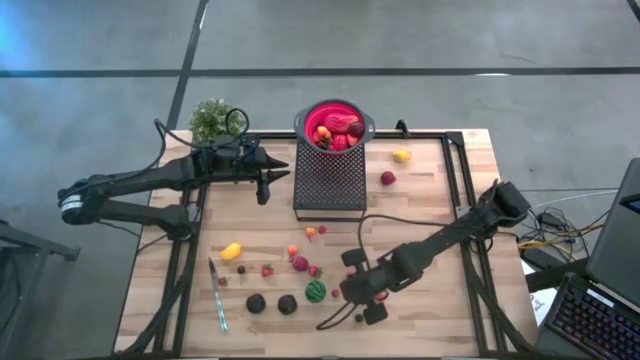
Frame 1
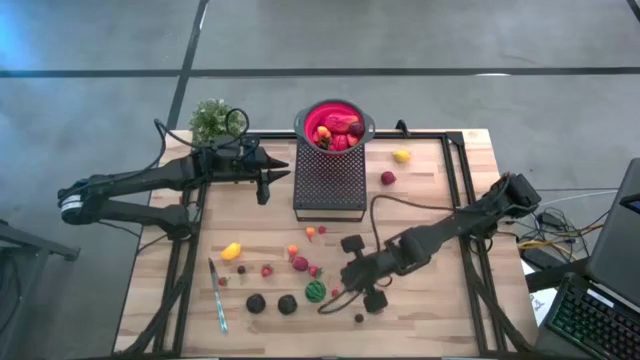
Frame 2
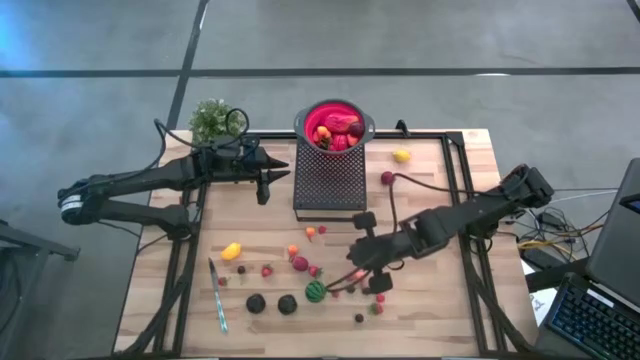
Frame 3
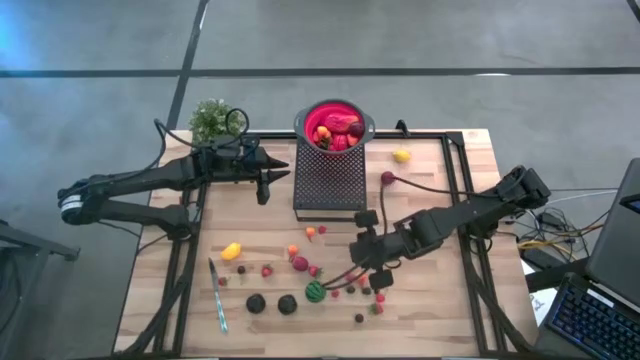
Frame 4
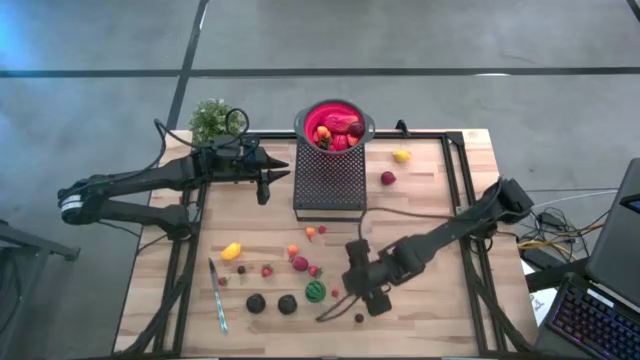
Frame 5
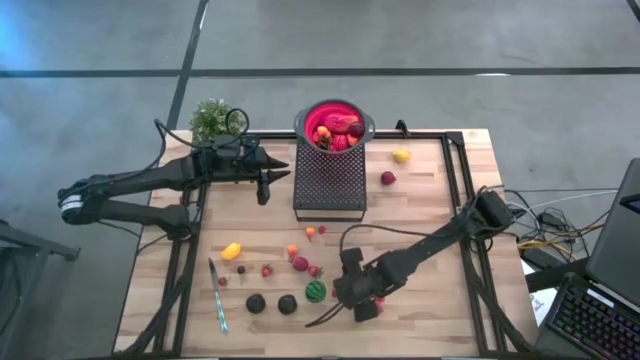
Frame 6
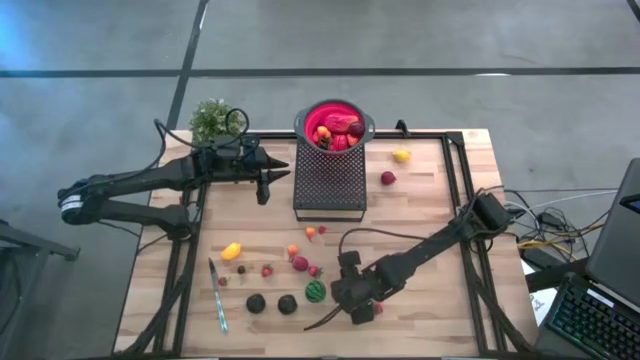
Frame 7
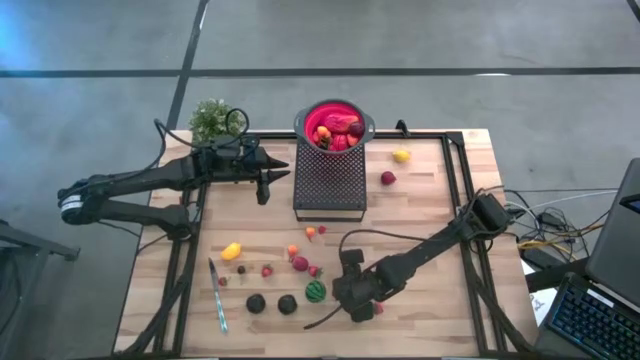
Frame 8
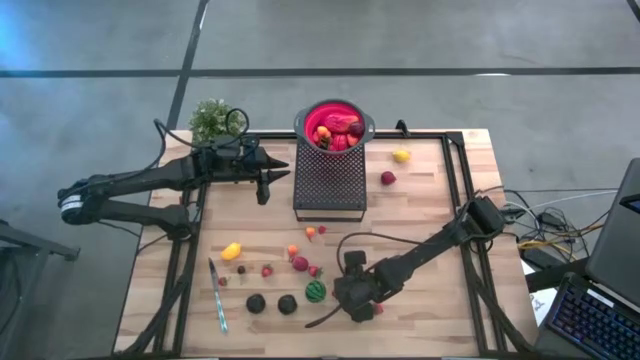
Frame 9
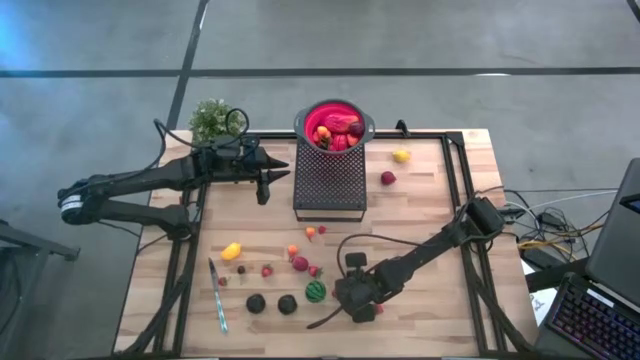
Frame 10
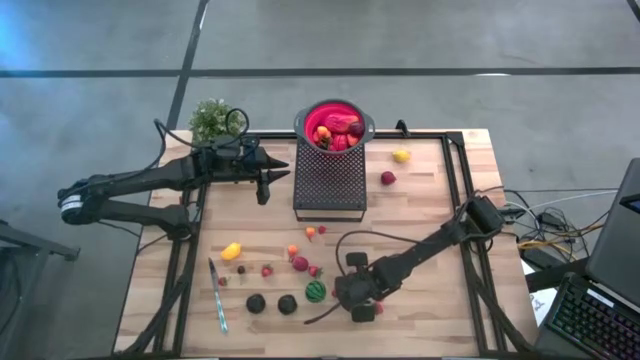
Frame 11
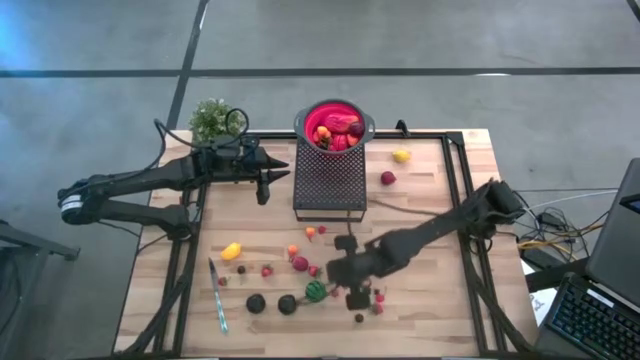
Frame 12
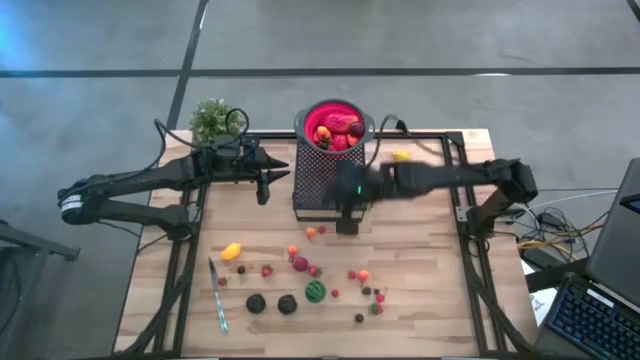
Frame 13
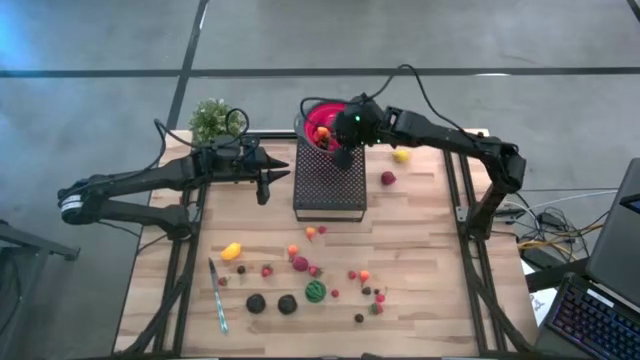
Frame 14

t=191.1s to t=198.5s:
Task: Pick & Place Fruit
Put the black cherry into the red strainer bowl on the shelf

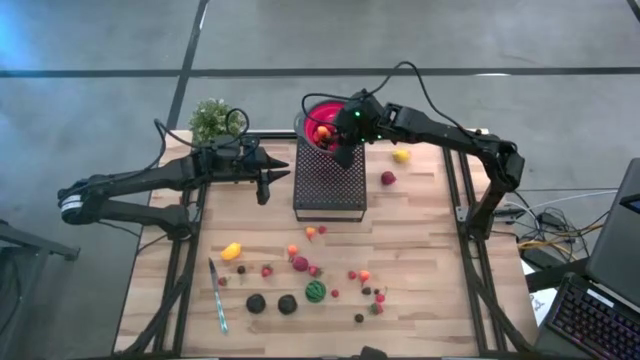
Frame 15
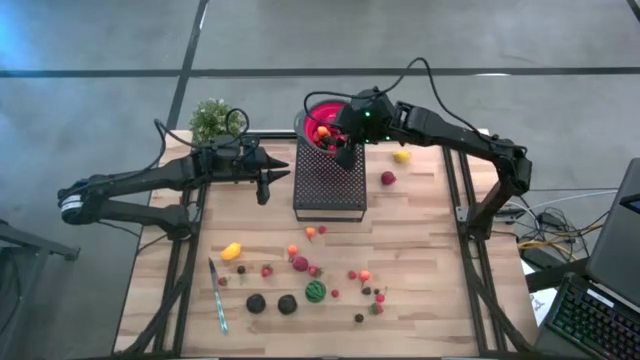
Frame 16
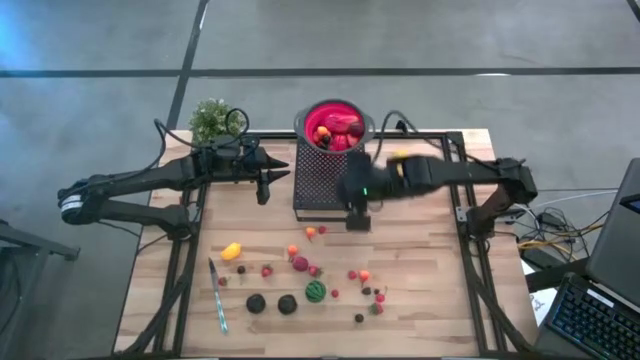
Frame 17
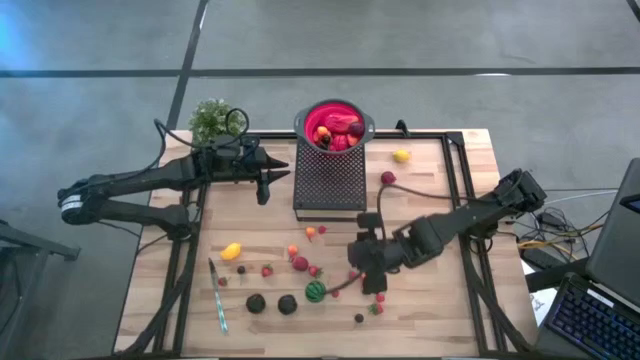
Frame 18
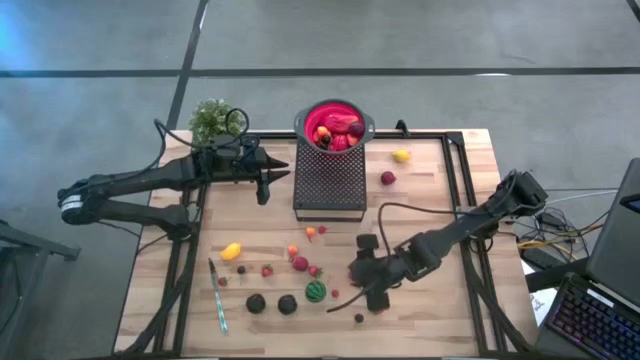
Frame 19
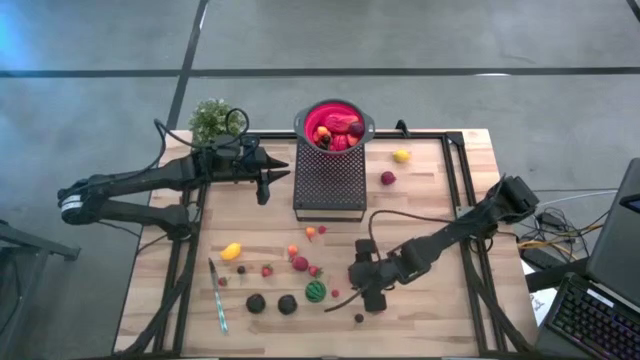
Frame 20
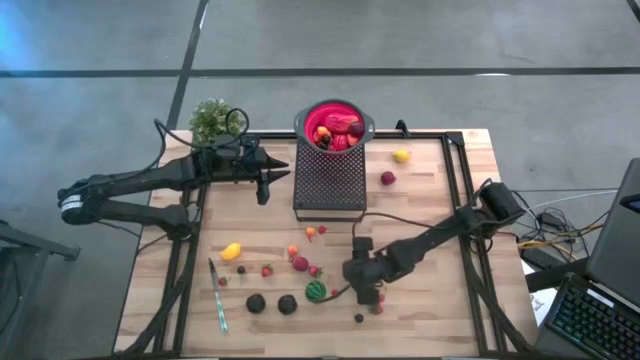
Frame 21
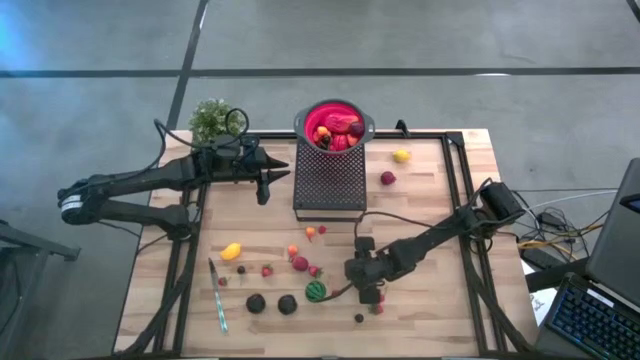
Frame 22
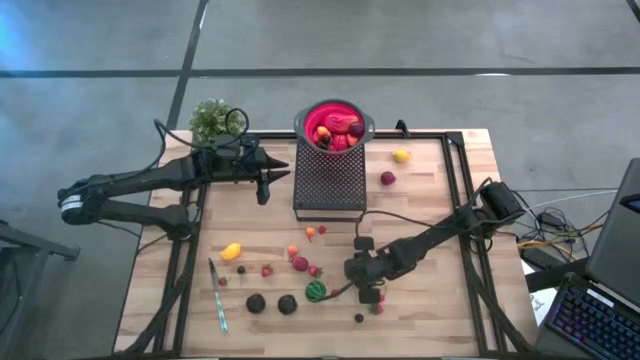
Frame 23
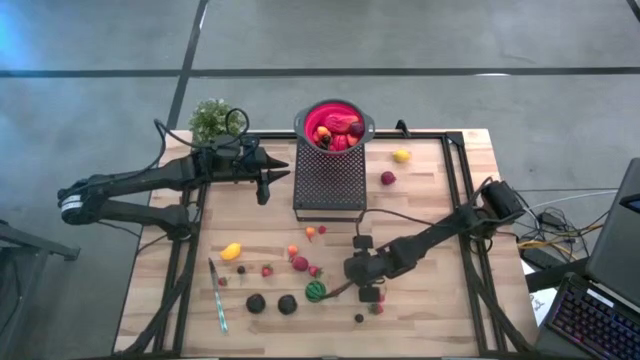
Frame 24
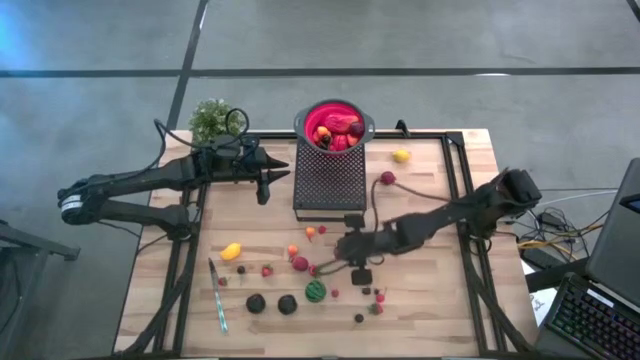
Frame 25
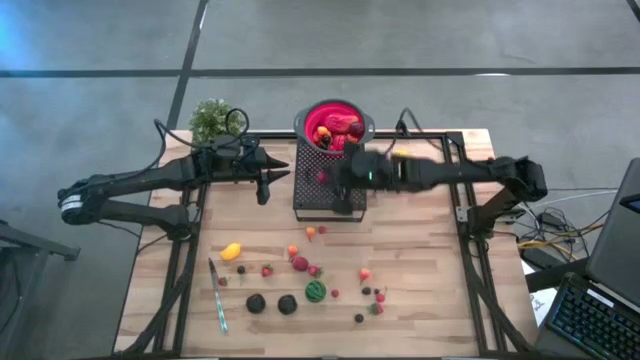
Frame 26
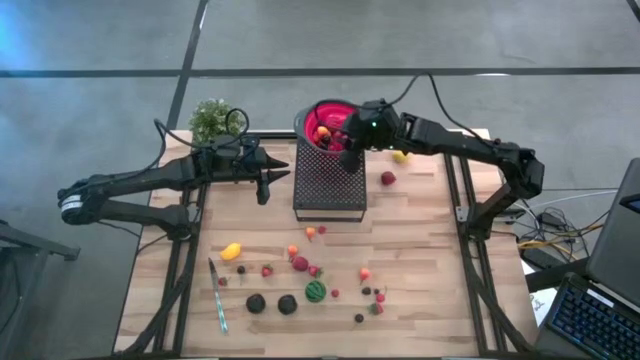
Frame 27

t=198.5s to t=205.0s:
Put the raspberry into the red strainer bowl on the shelf

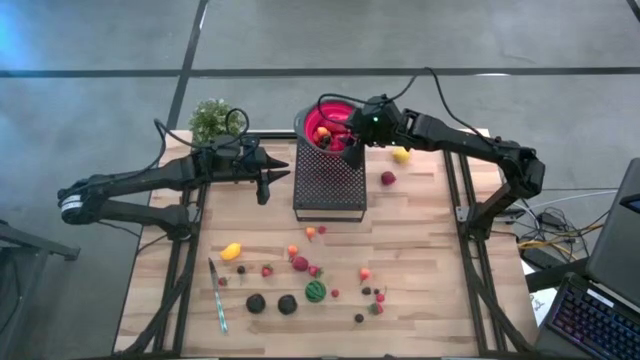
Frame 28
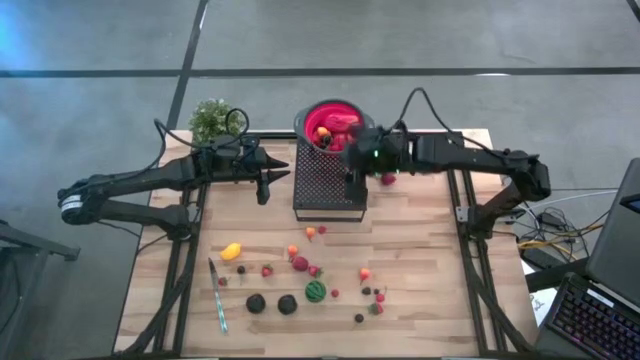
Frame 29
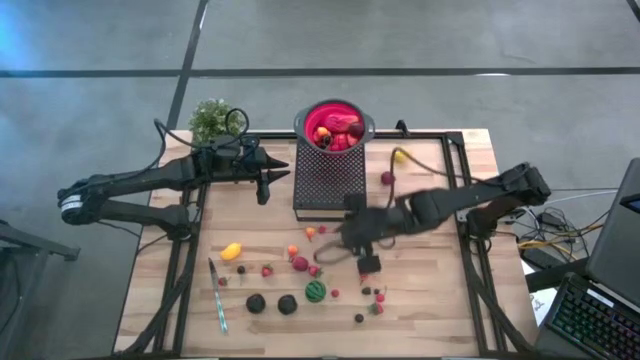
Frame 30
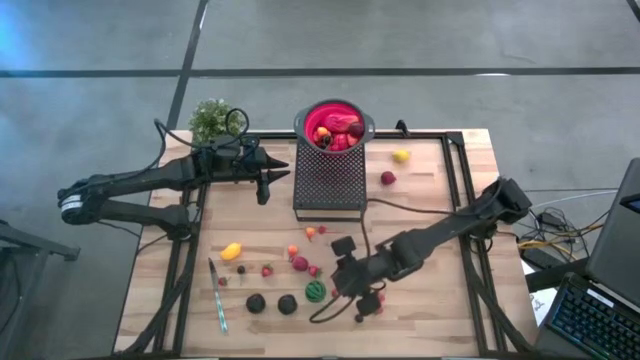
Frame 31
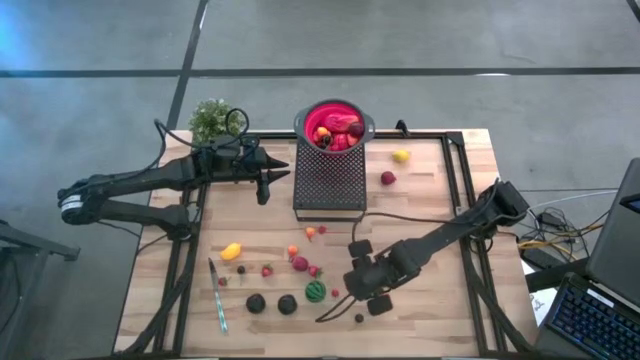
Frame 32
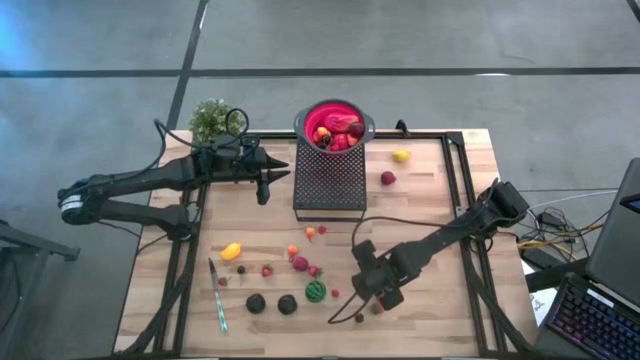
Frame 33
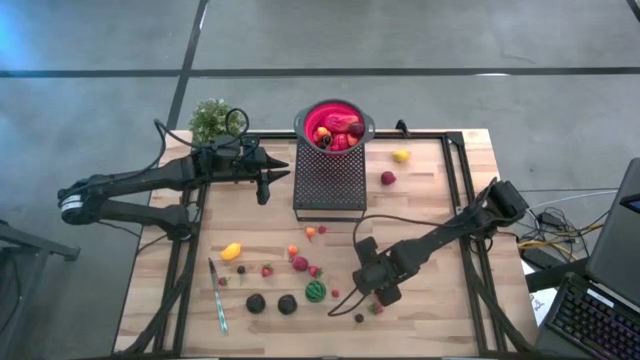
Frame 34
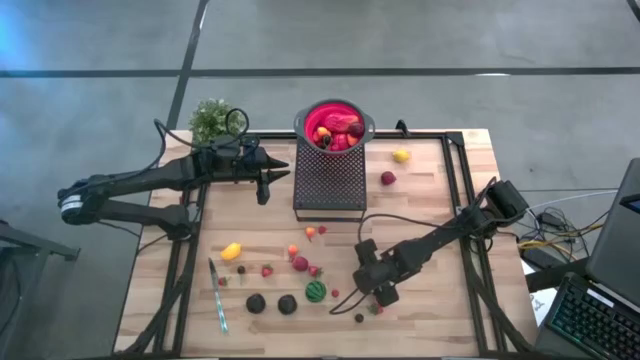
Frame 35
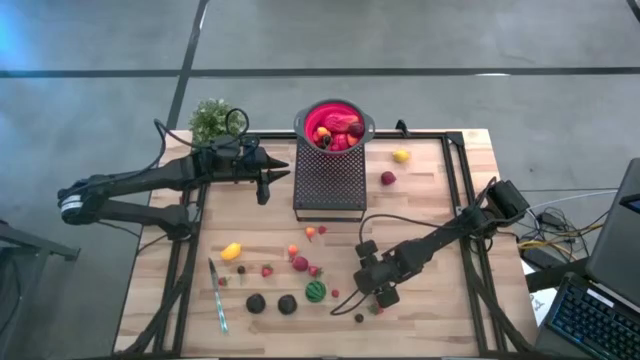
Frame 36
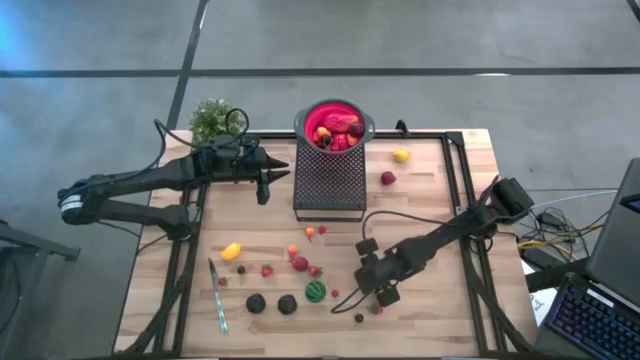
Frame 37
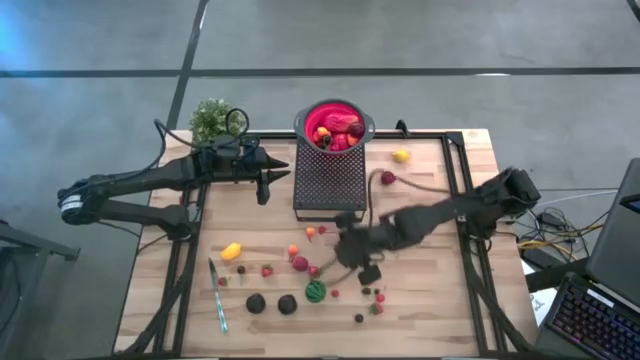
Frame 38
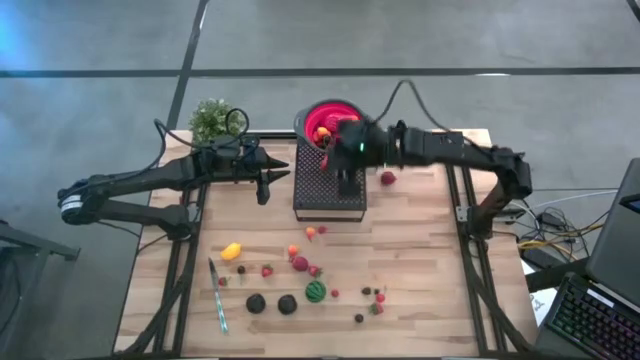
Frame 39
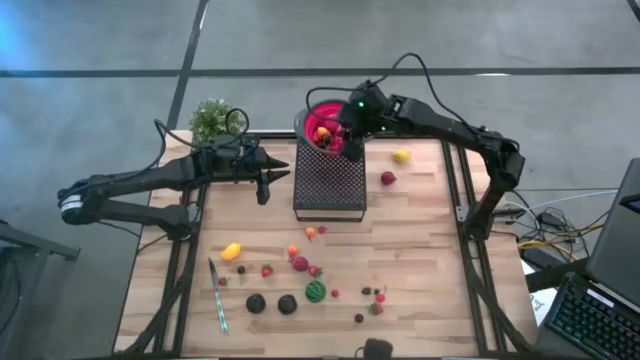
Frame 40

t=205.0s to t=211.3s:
Put the pear into the red strainer bowl on the shelf

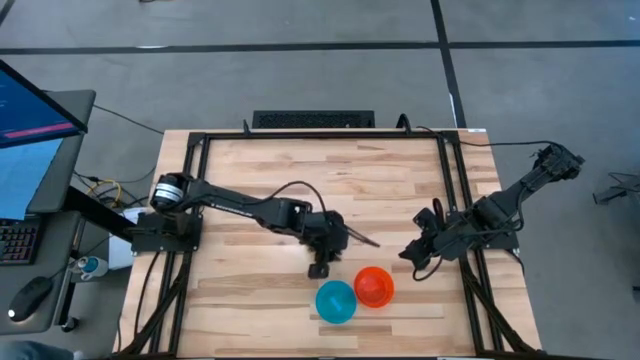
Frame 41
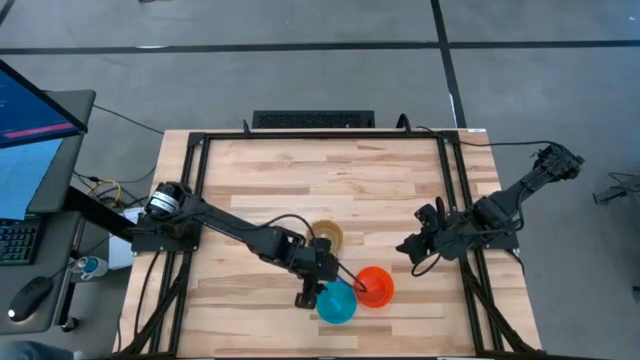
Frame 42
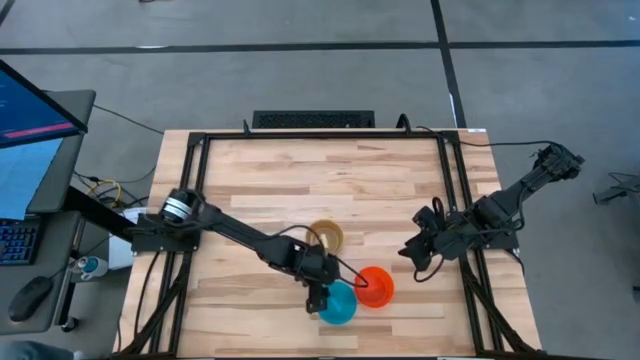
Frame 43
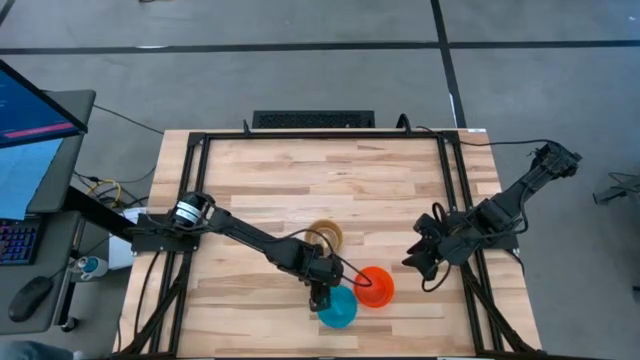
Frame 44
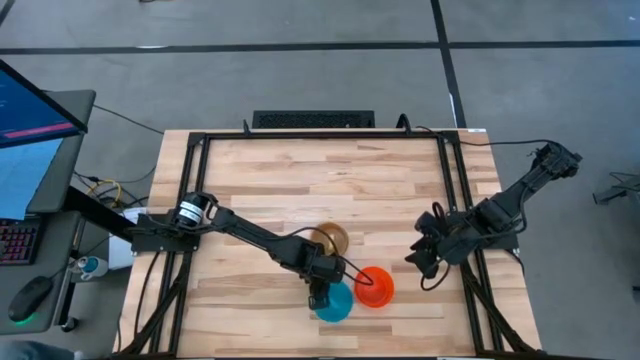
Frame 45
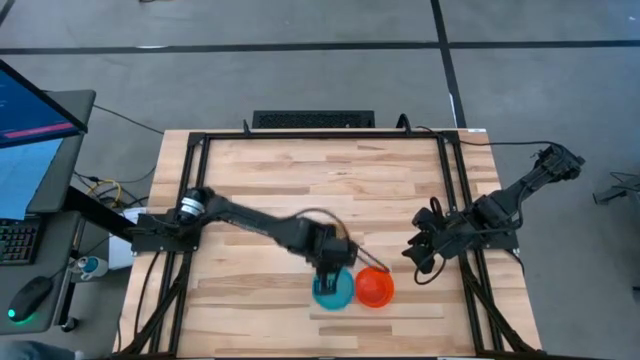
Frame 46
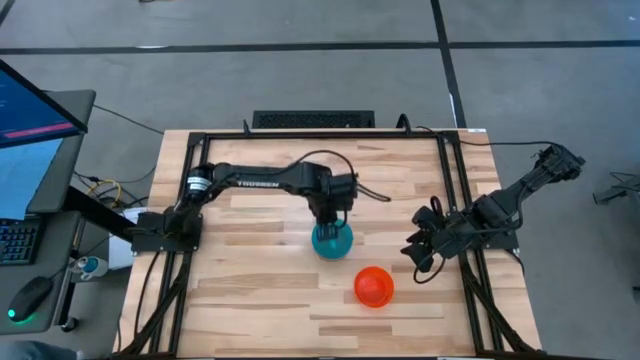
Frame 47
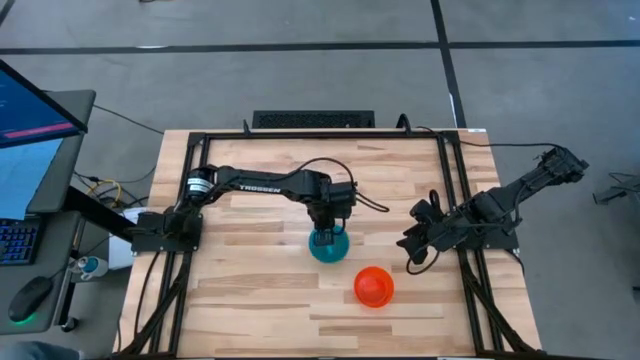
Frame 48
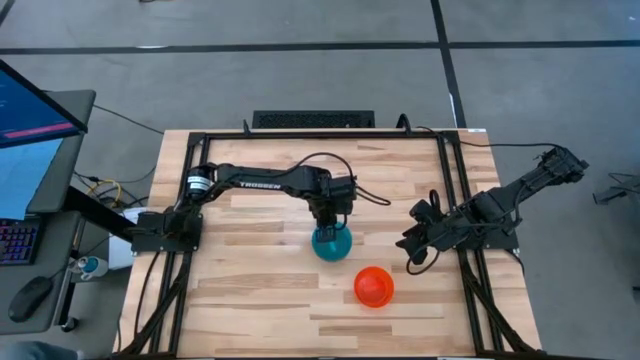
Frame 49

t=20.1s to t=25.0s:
Task: Nest bowls inside each other
Stack the blue bowl on top of the yellow bowl
